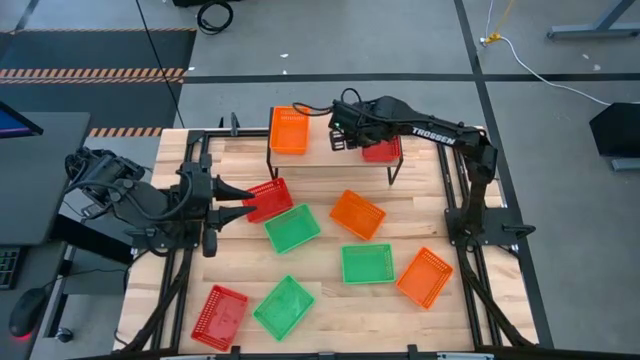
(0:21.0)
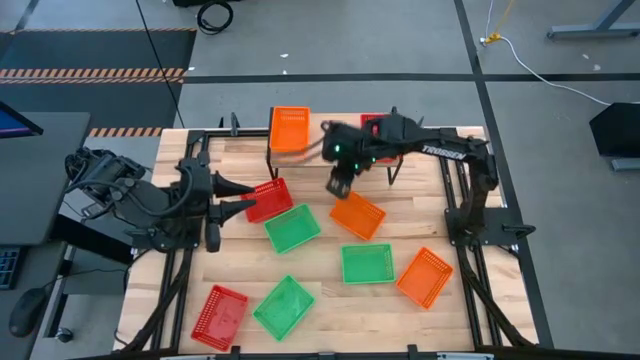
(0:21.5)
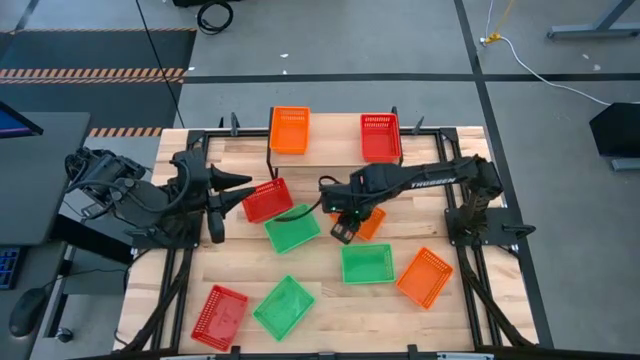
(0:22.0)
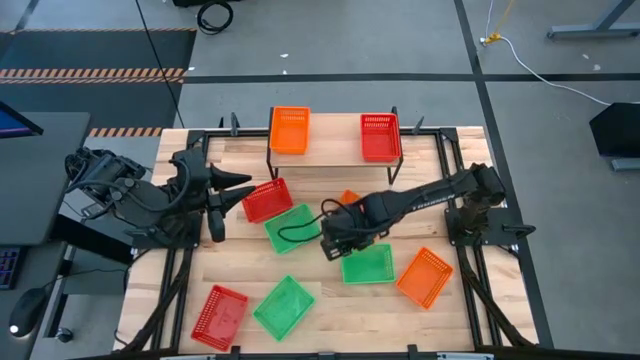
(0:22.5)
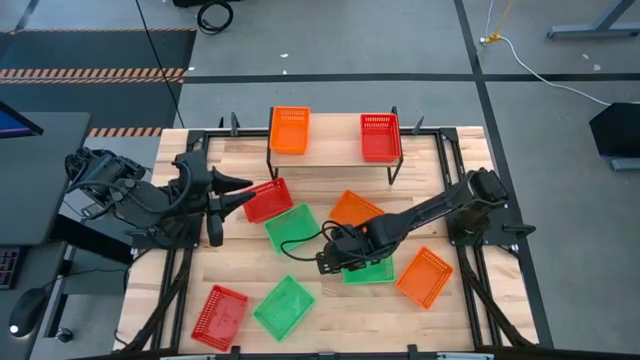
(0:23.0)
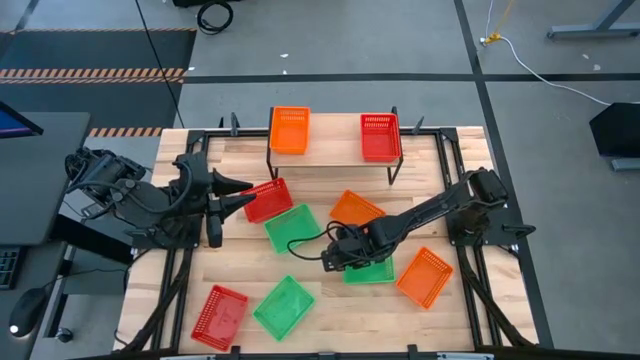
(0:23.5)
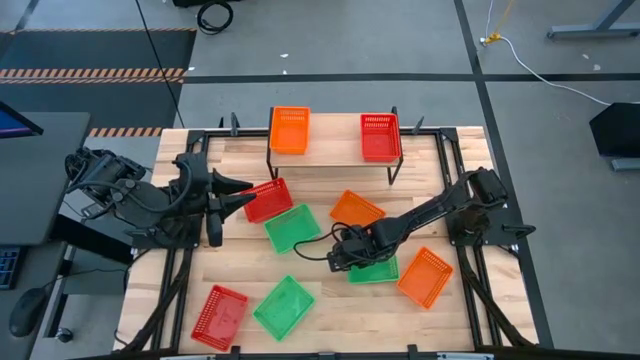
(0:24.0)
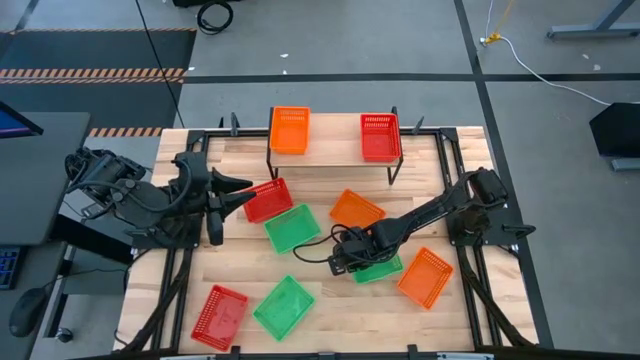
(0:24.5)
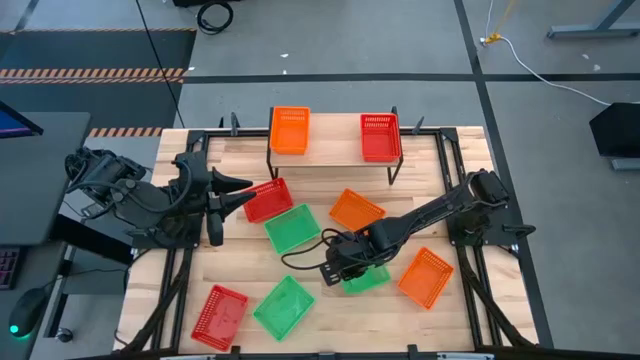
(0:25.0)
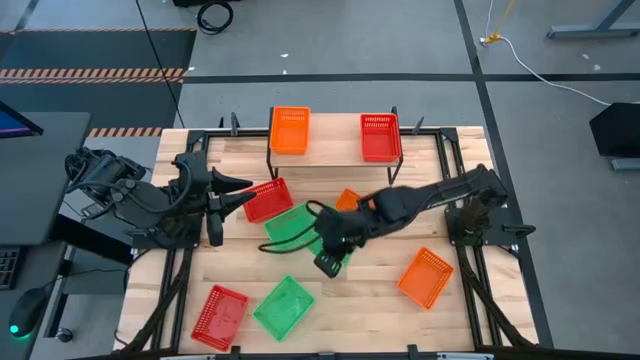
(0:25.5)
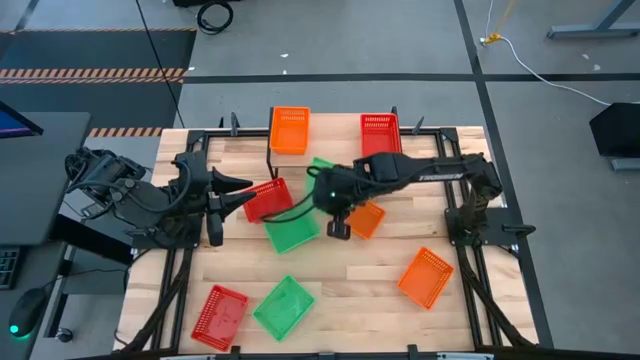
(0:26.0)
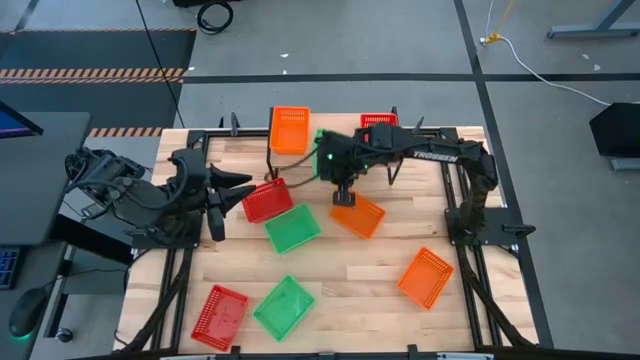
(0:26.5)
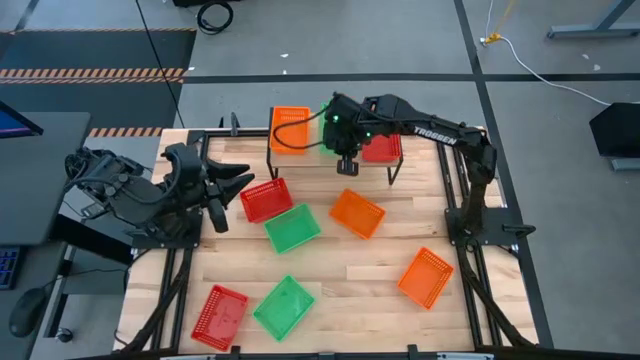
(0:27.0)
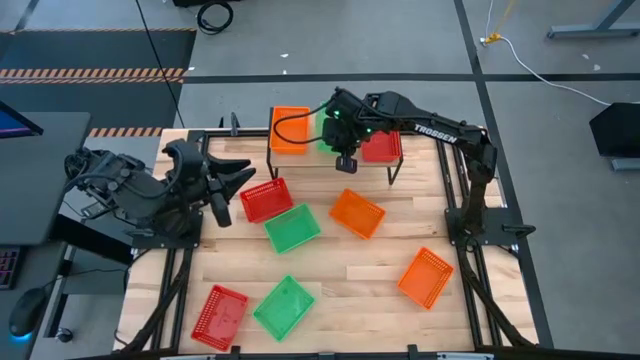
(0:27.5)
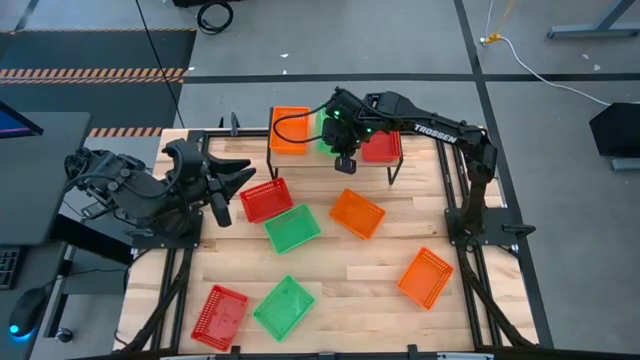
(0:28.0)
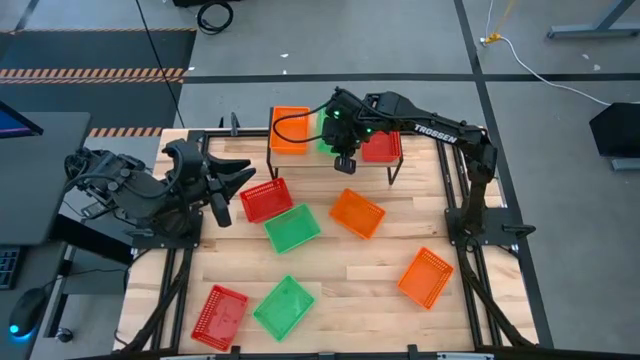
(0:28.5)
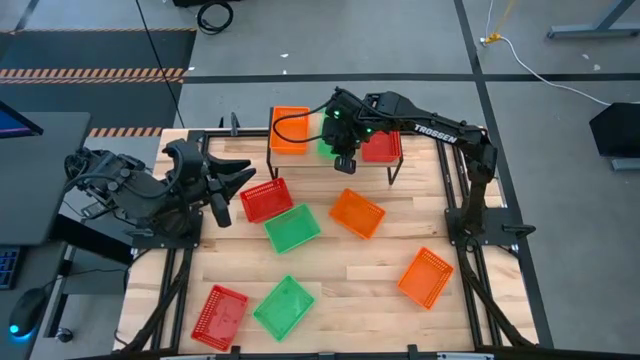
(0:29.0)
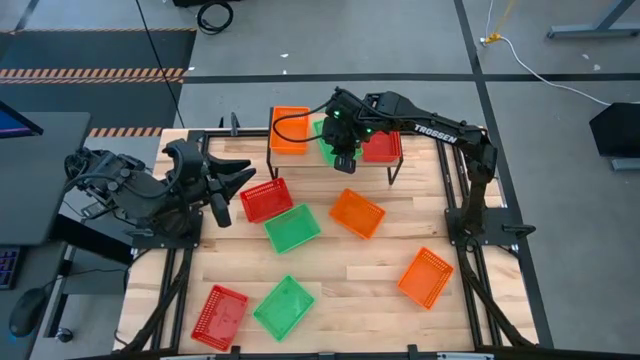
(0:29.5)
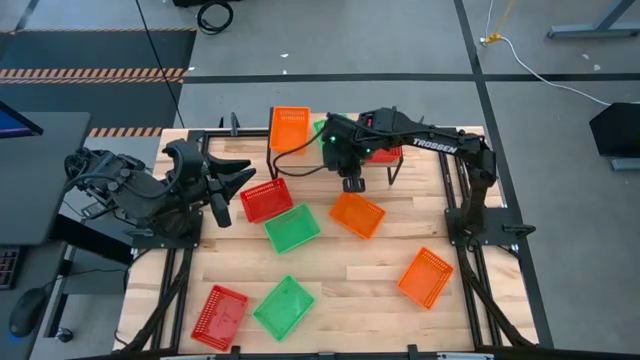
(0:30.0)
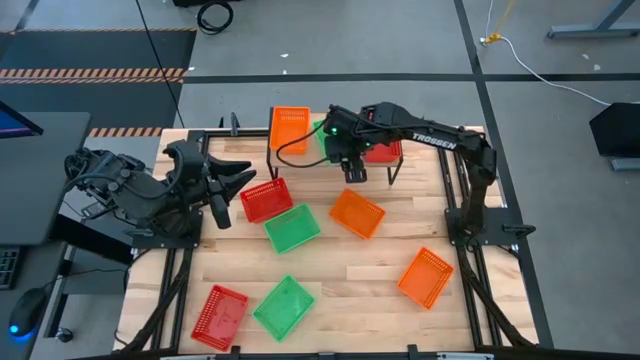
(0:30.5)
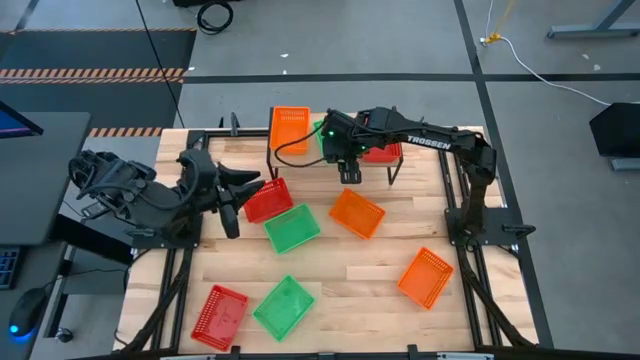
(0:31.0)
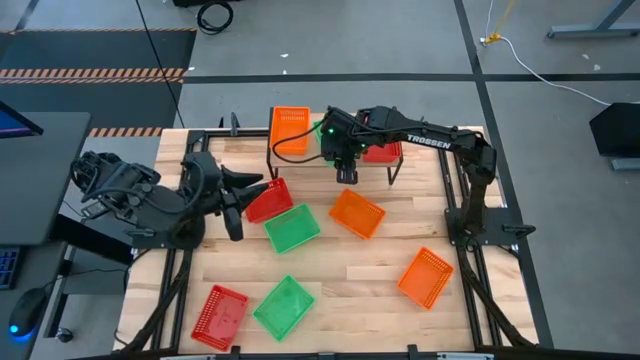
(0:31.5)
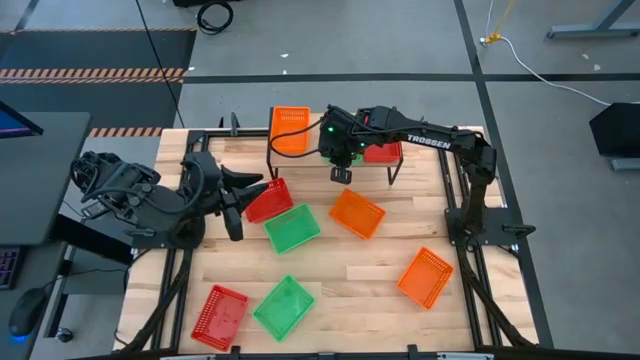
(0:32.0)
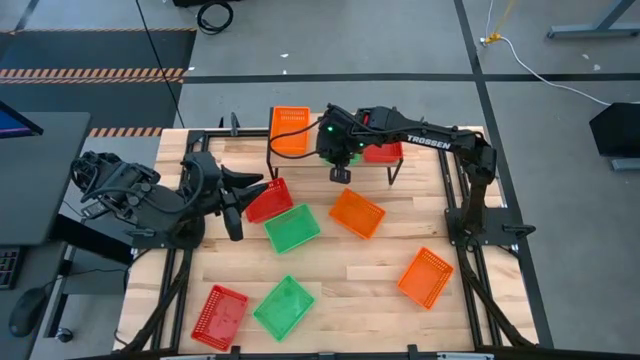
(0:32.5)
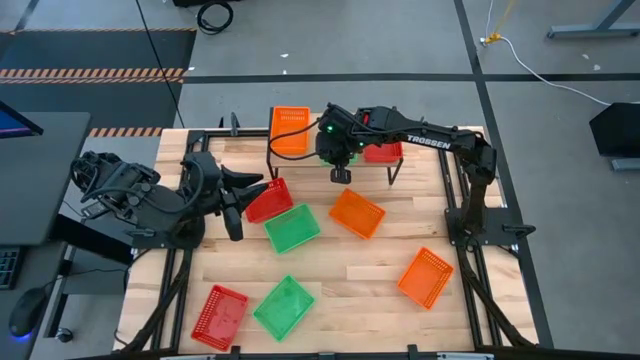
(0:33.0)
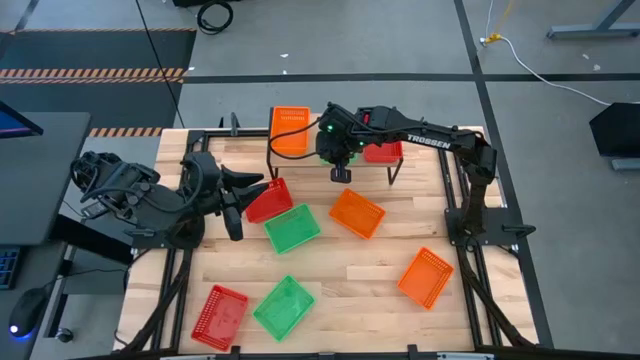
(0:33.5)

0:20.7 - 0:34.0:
Task: Stack baskets on shelf by color
Put the right green bin on the shelf

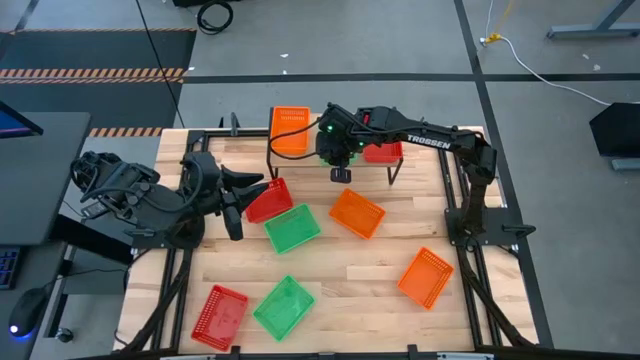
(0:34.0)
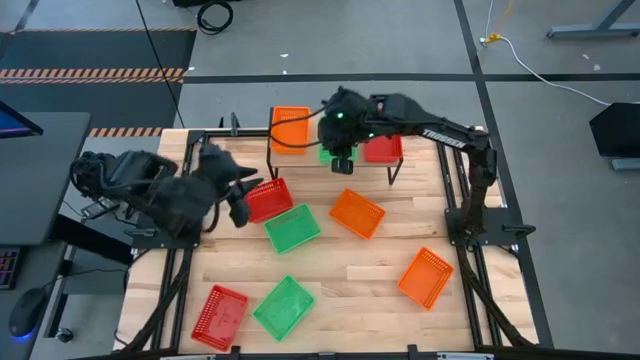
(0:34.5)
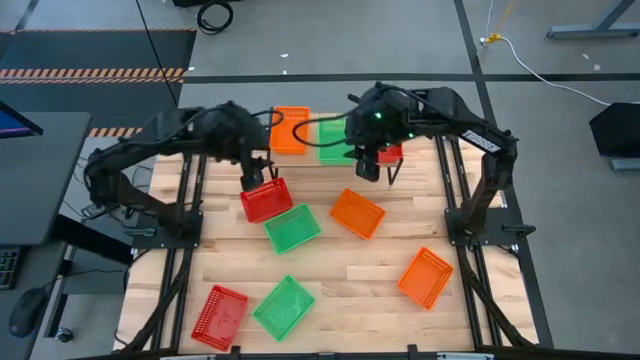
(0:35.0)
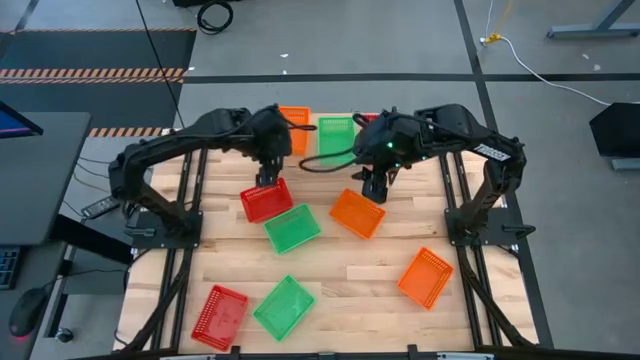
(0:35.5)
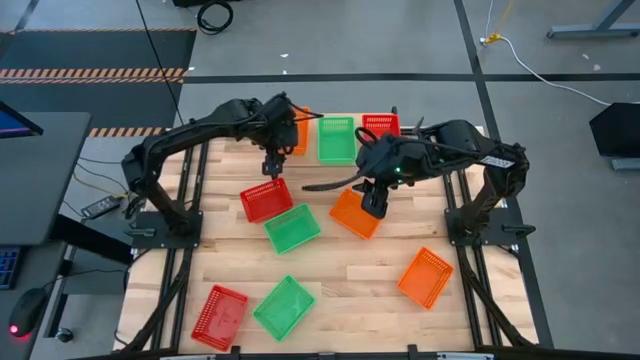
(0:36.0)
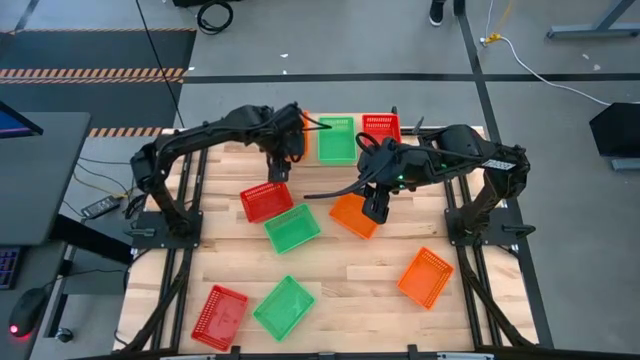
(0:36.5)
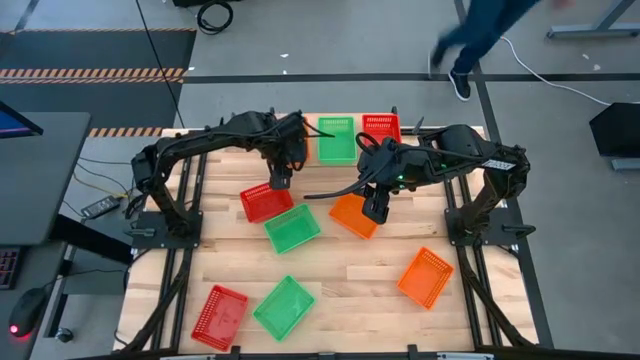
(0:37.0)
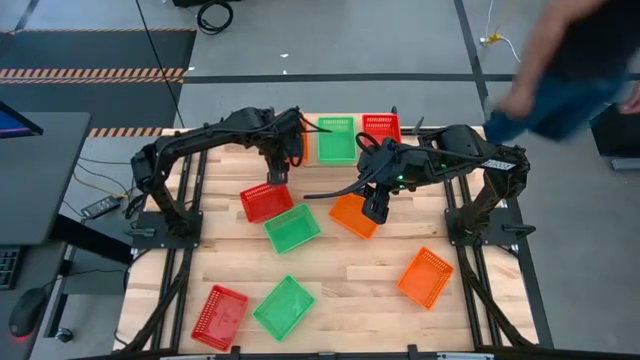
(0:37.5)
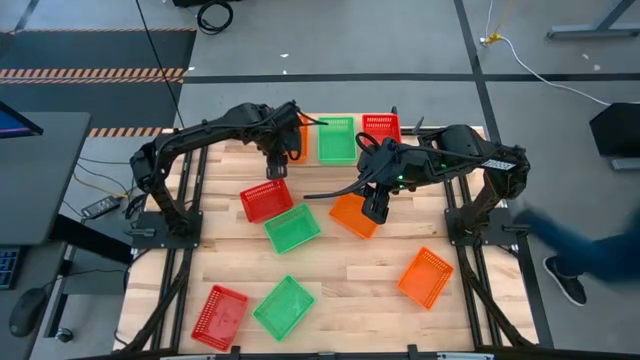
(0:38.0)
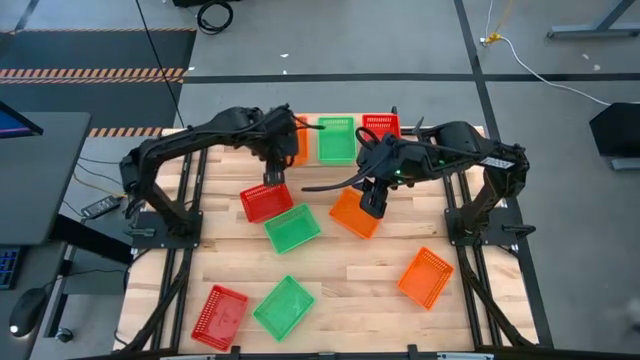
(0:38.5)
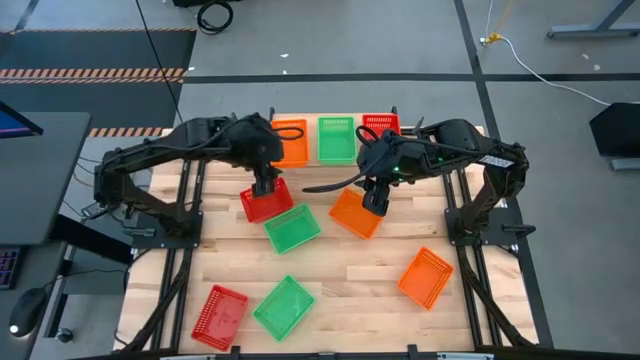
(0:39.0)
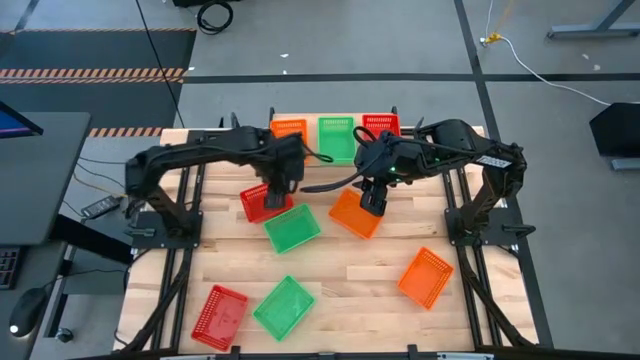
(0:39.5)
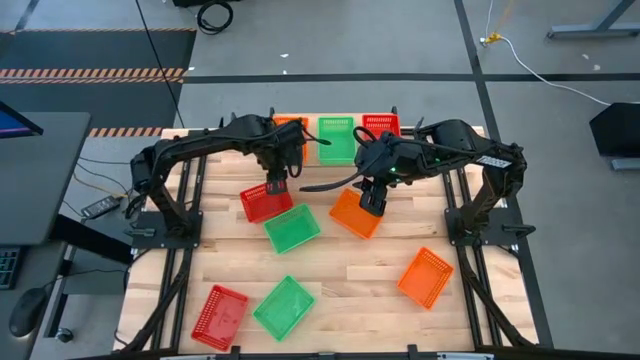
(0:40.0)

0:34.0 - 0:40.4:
Adjust the orange bin on the shelf

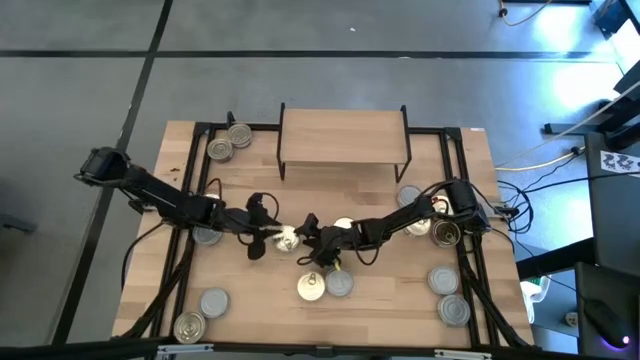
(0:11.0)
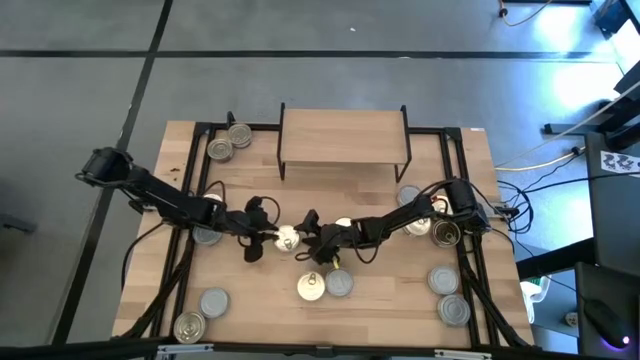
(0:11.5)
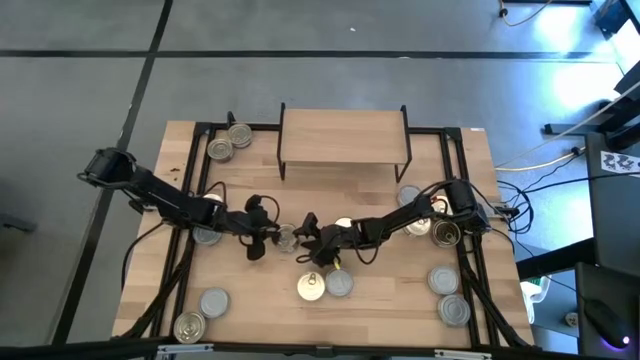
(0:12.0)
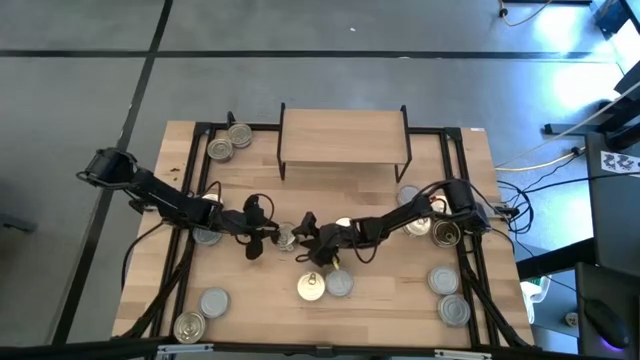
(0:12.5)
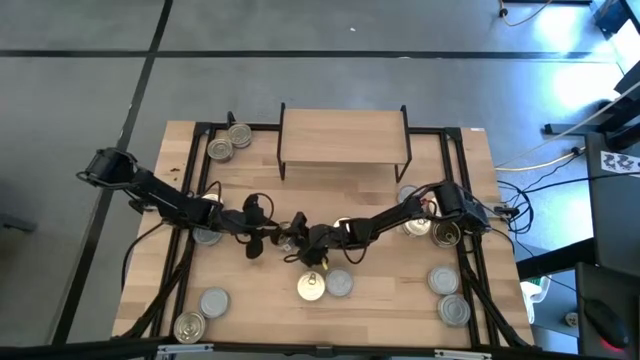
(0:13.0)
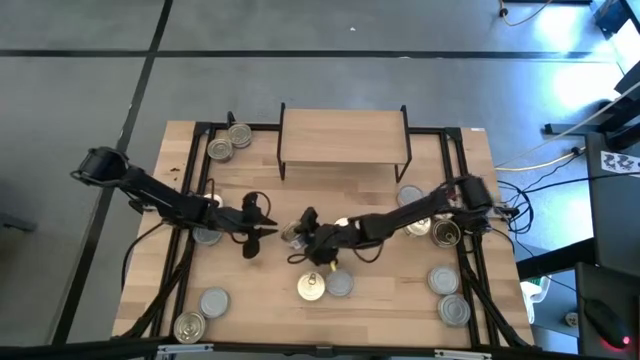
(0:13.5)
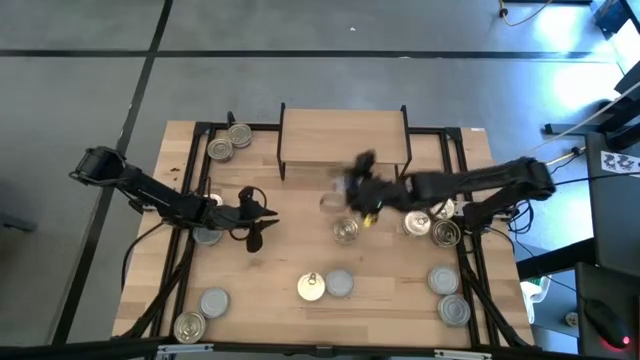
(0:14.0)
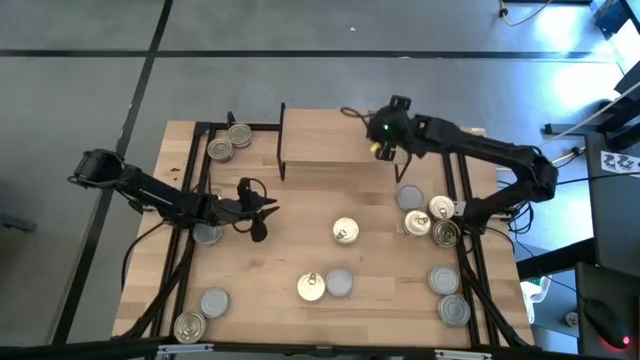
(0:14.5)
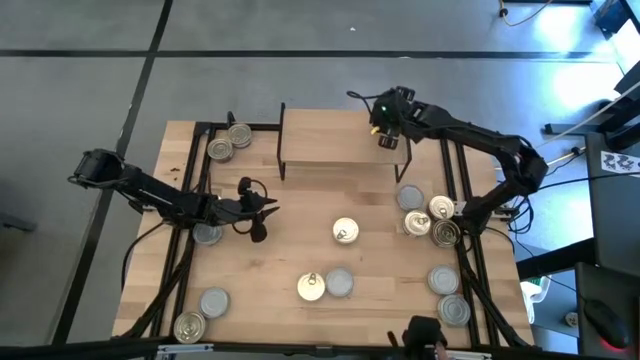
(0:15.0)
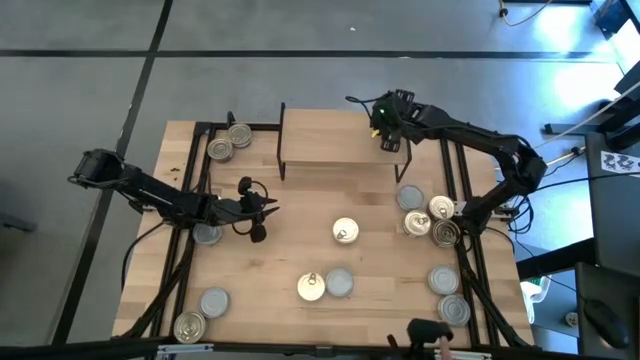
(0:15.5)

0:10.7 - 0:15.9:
Task: Stack canned seafood by type on shelf
Put the blue pink tuna can on the shelf
